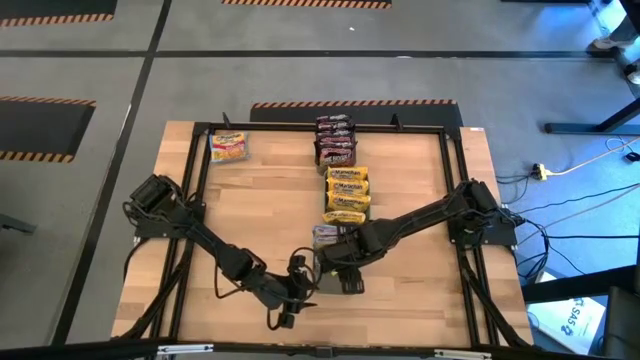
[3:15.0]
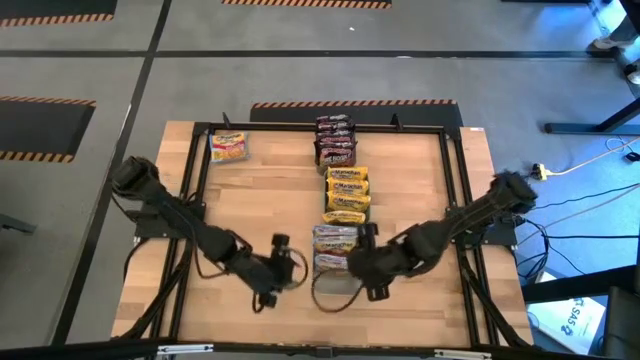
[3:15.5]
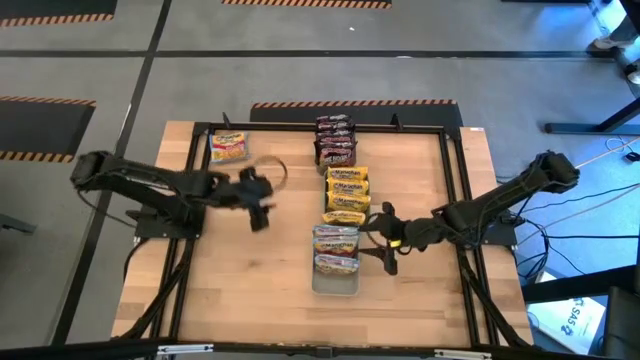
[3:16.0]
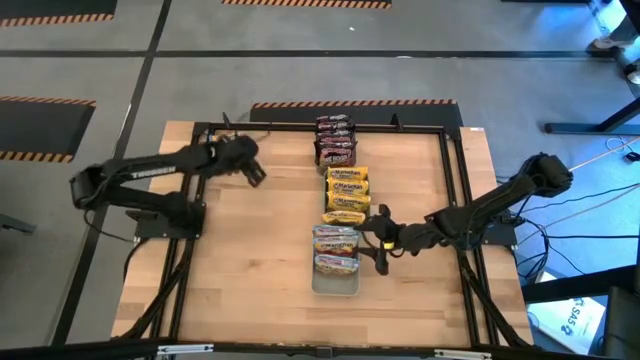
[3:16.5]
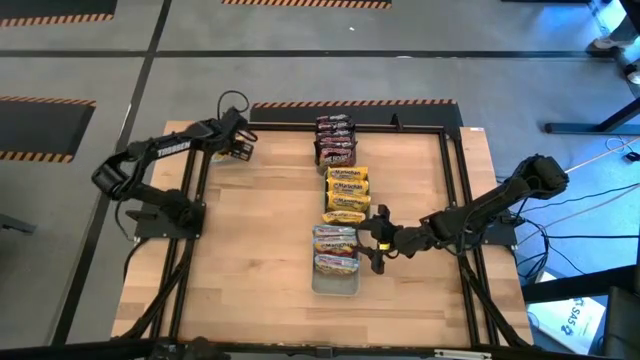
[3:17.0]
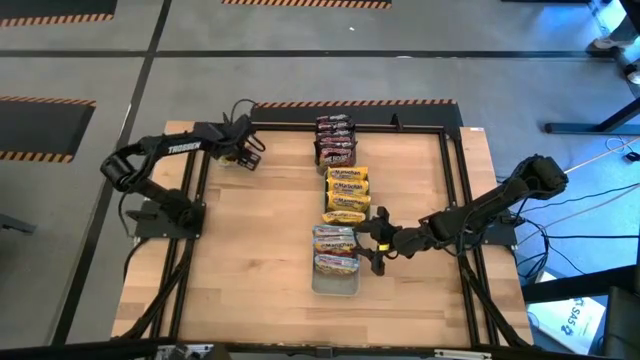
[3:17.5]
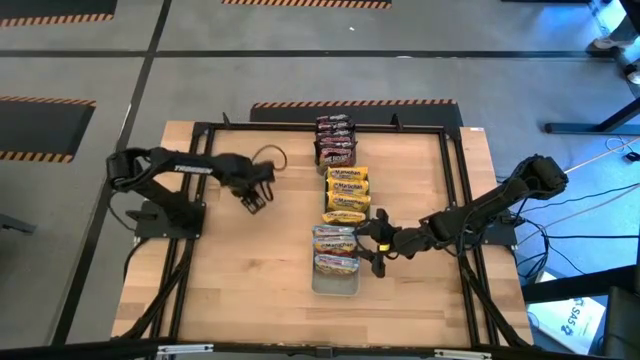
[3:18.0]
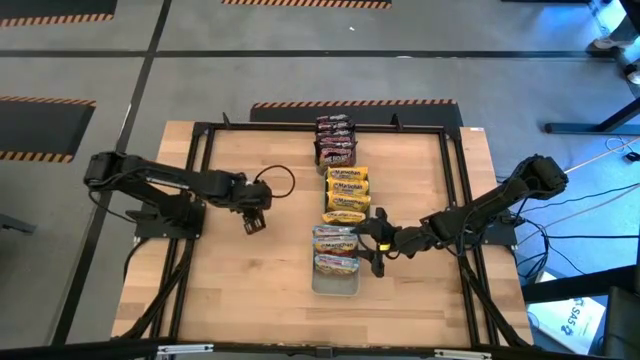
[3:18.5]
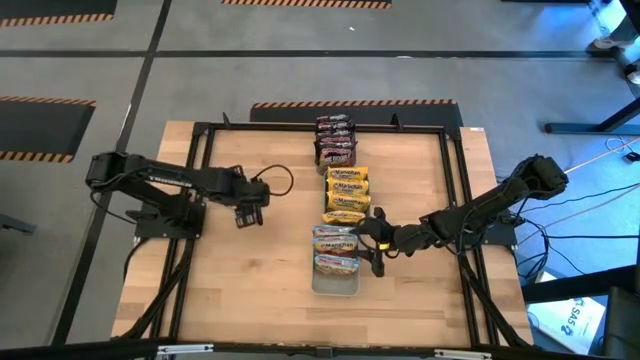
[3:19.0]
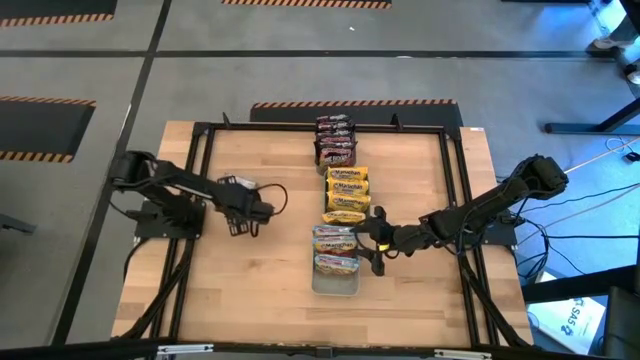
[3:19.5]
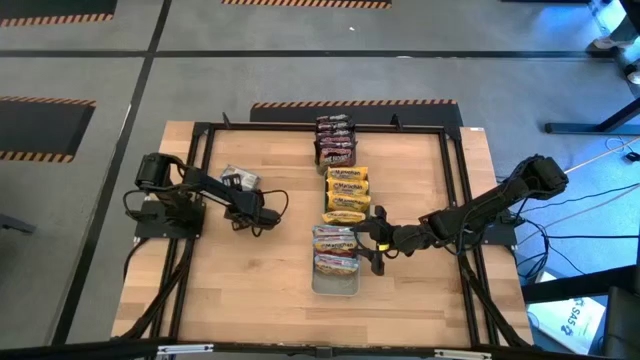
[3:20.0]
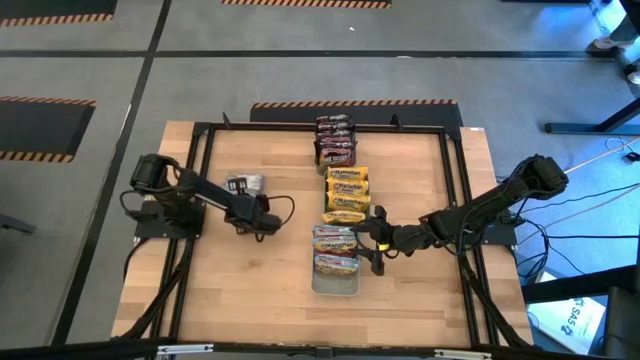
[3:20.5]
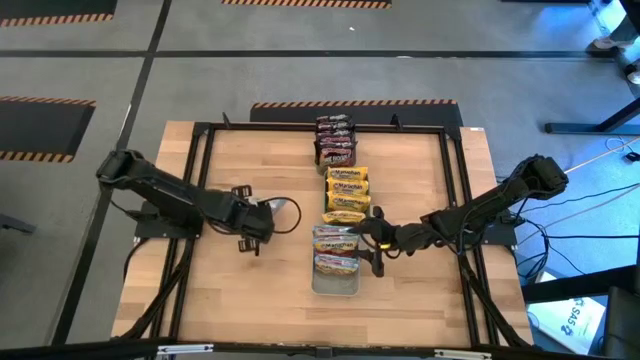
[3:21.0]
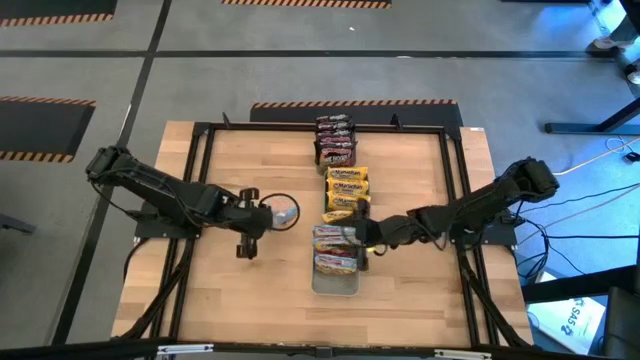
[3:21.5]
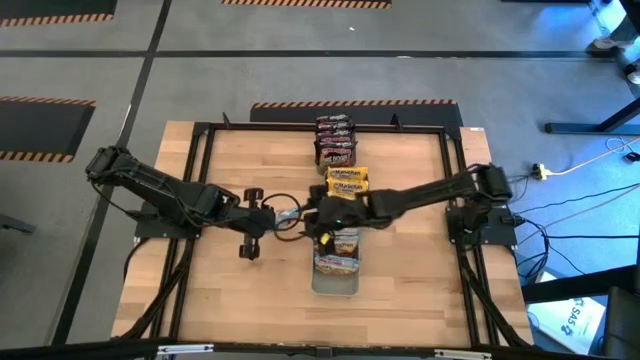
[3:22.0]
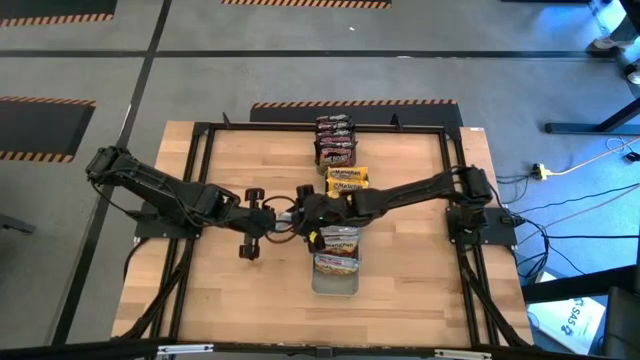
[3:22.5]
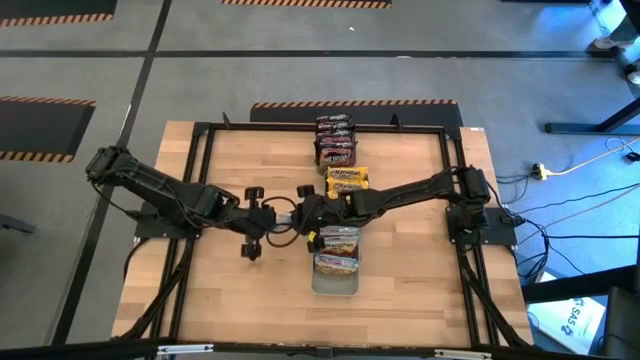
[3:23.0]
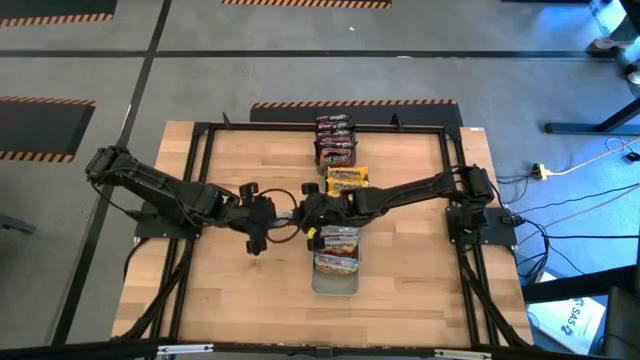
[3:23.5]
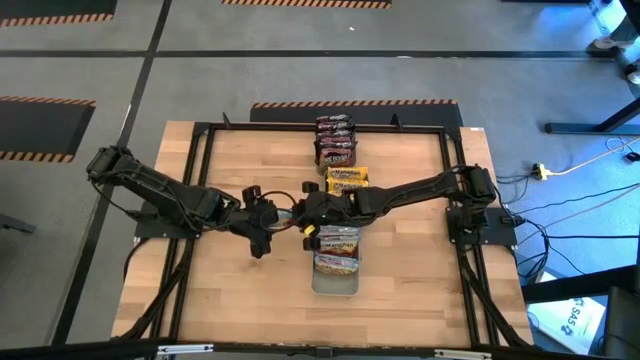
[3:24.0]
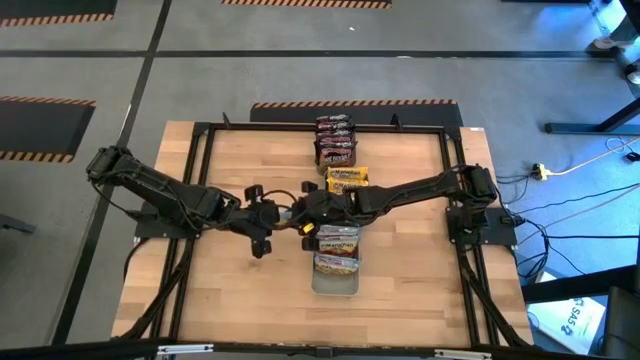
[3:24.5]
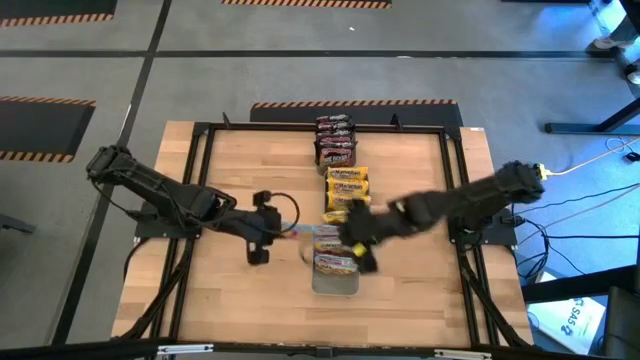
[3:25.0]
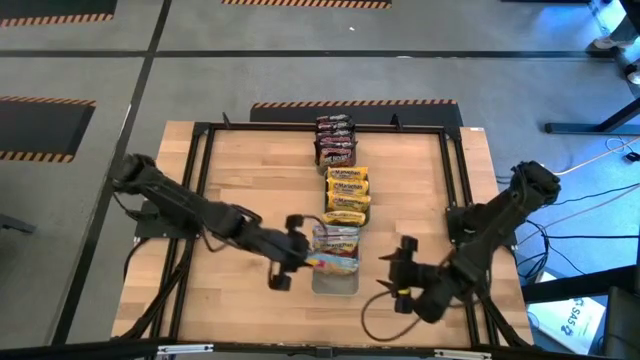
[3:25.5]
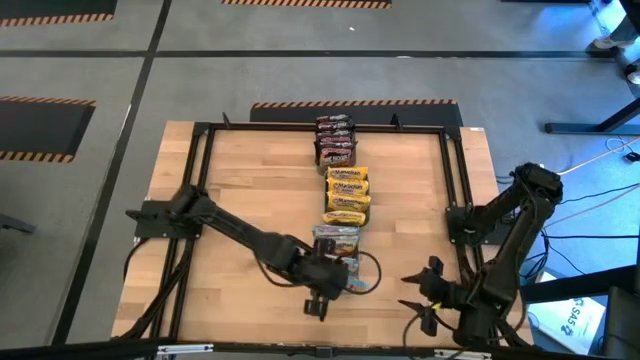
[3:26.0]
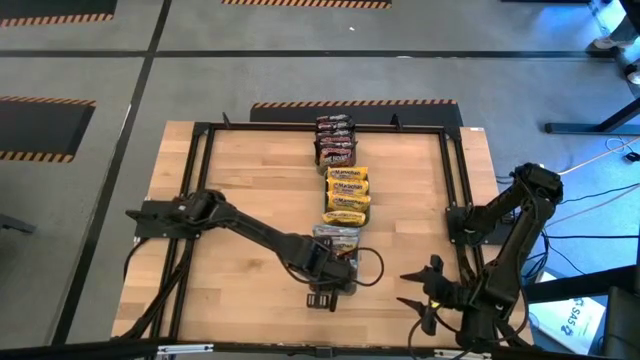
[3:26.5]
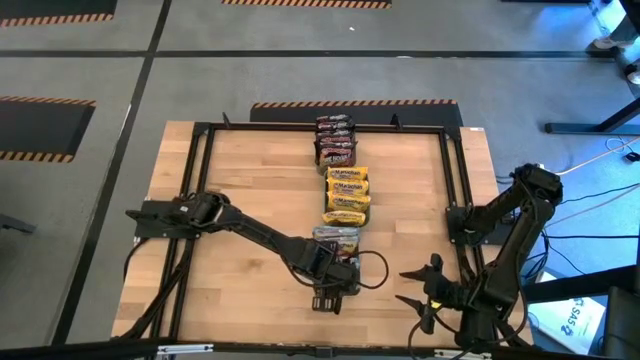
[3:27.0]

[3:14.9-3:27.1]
Task: Sort Maruchan noodles
Put the blue noodle pack into the gray bin

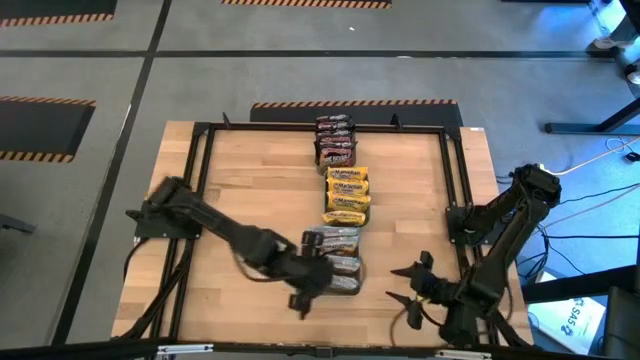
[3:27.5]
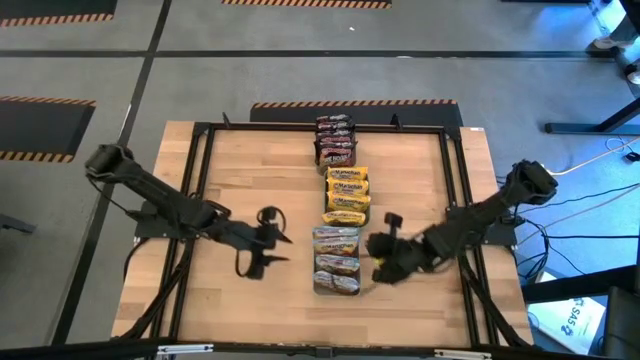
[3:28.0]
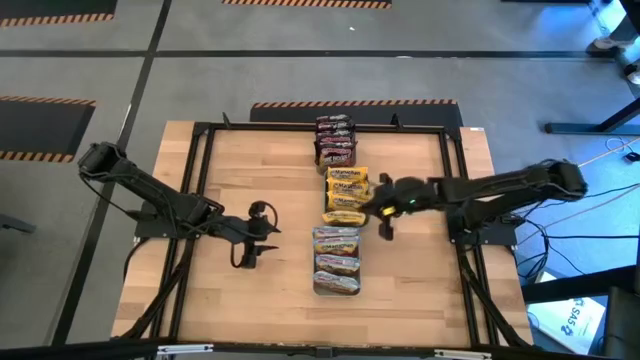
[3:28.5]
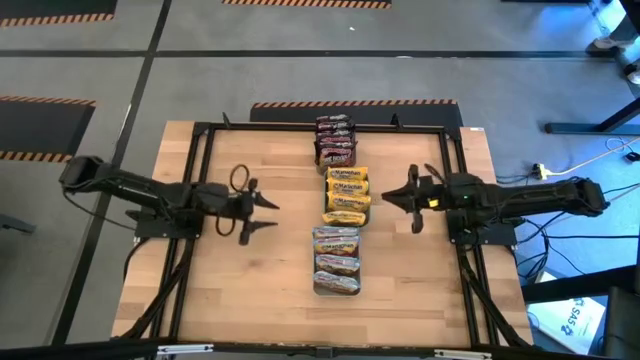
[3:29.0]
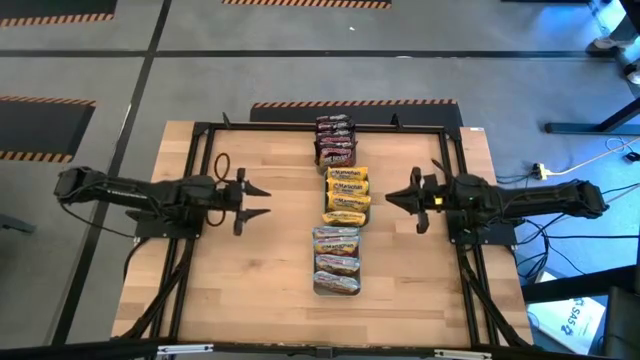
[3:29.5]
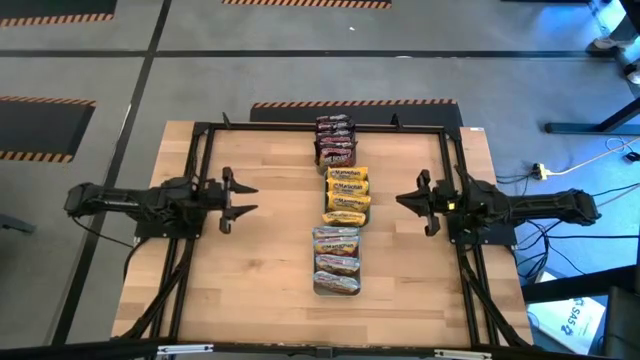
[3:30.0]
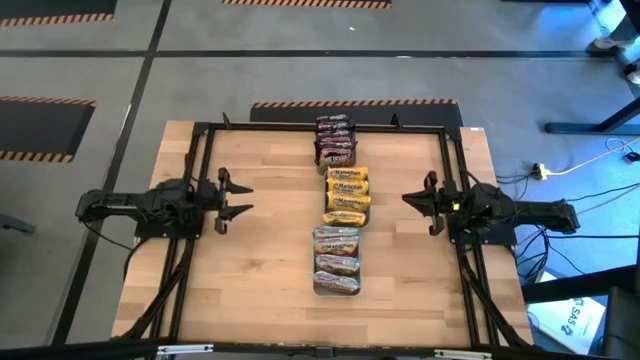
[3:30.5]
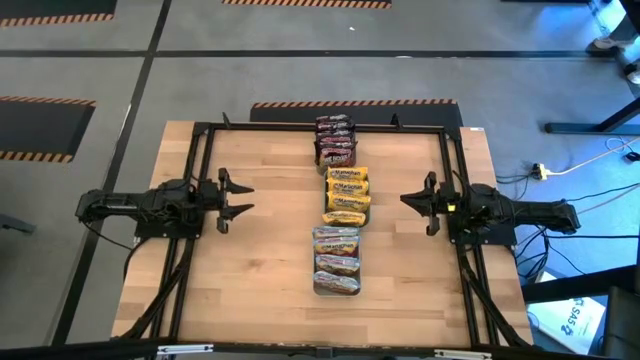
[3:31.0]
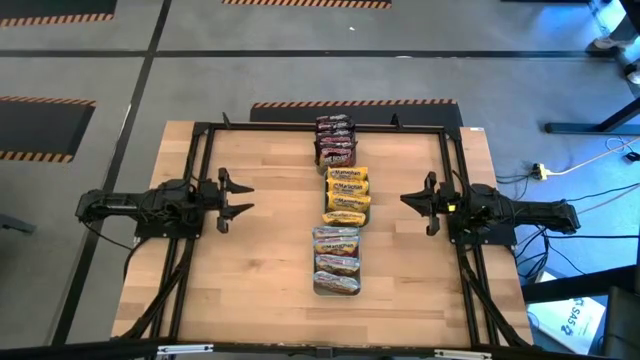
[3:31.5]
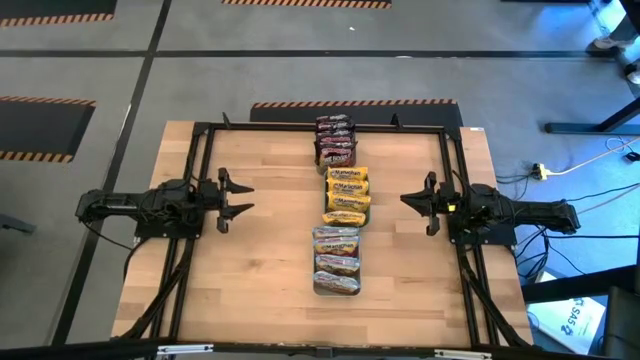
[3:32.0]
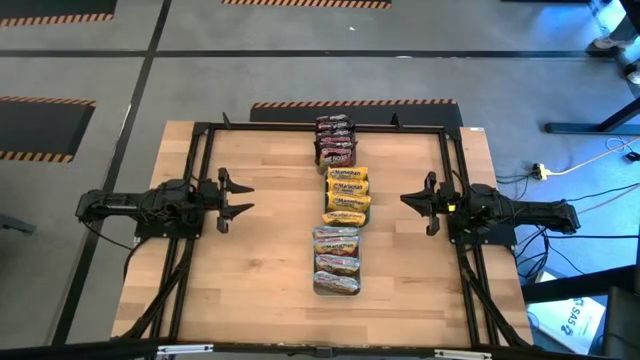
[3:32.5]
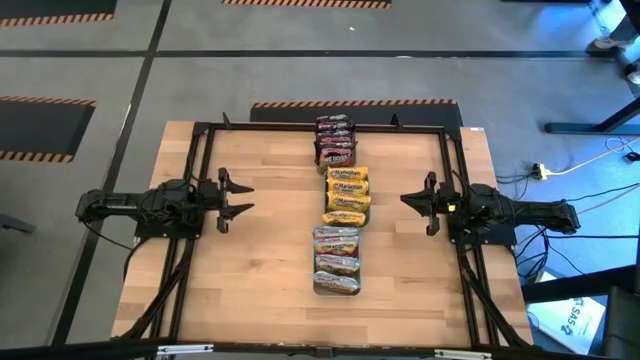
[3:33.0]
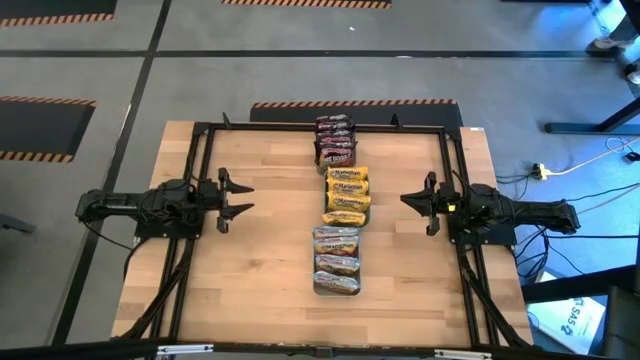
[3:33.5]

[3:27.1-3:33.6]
Return to Home Position

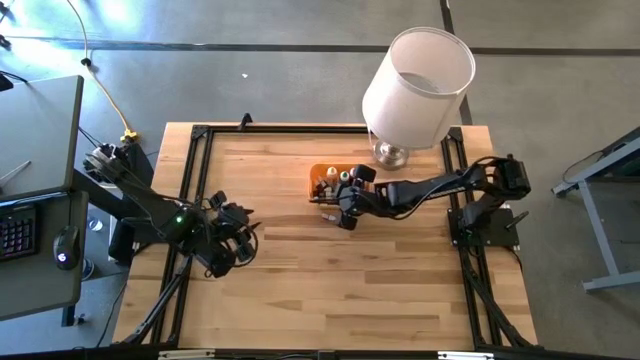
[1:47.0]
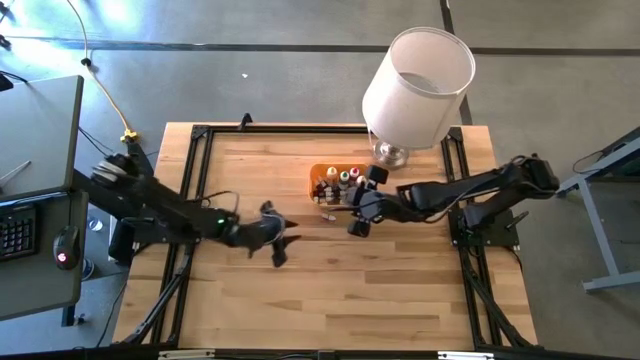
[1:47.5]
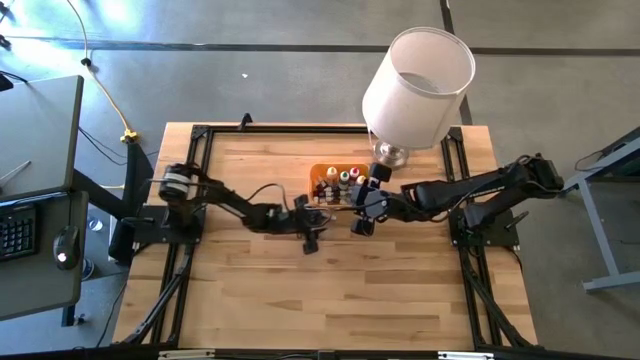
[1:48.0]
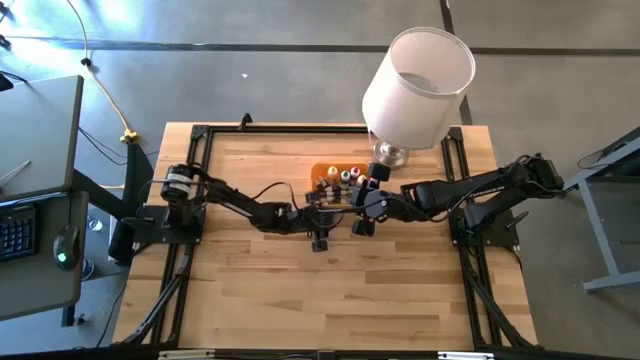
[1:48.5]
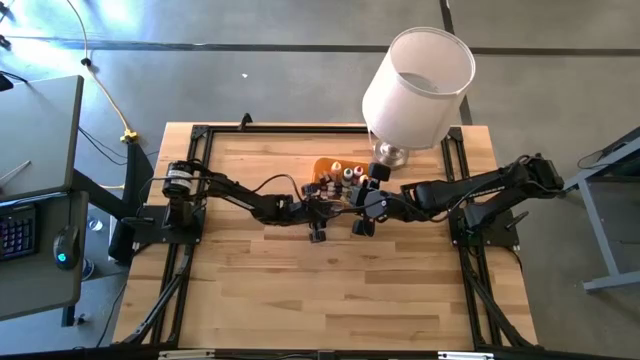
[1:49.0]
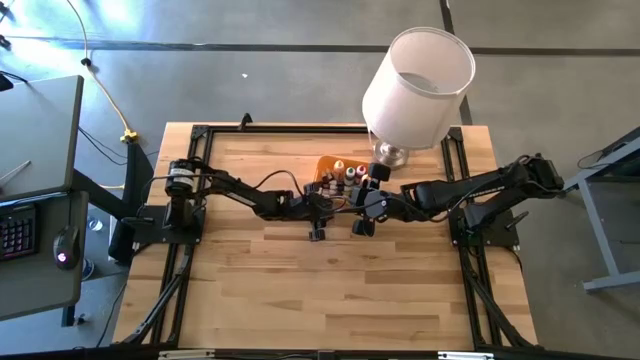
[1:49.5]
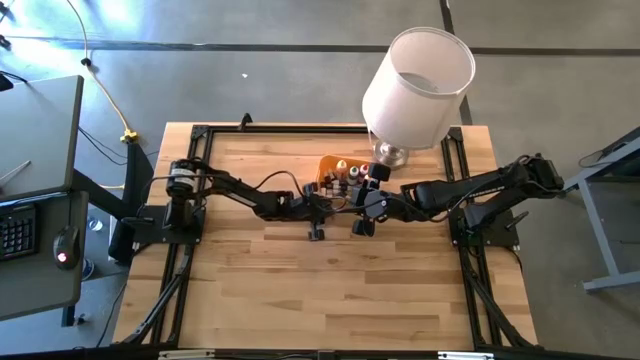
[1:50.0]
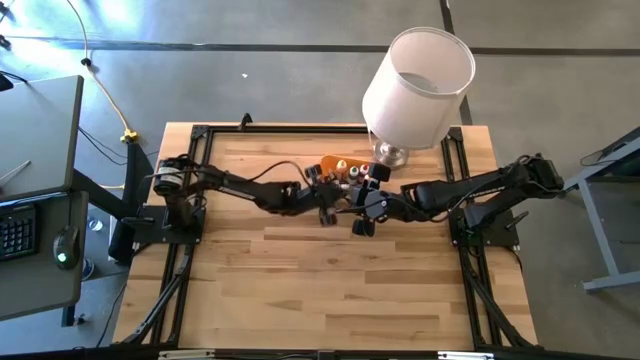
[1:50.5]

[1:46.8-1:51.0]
Task: Pick & Place food coloring
Put the small red food coloring bottle into the yellow container
